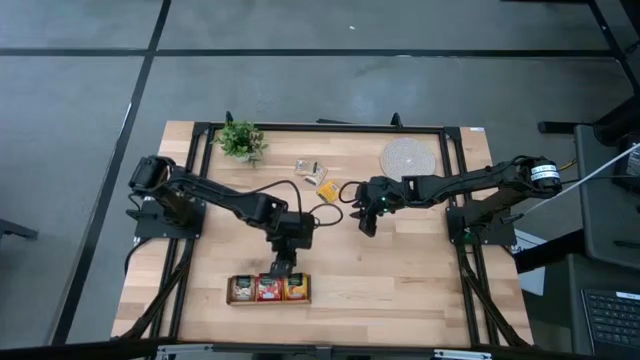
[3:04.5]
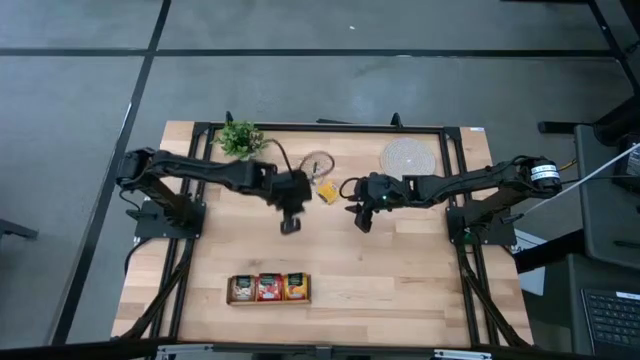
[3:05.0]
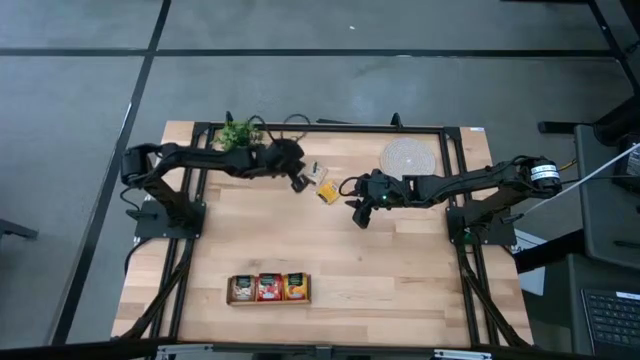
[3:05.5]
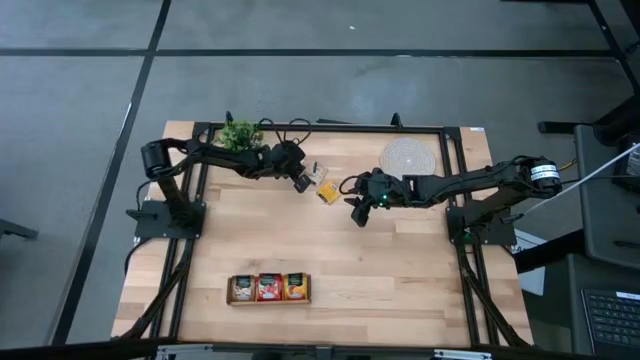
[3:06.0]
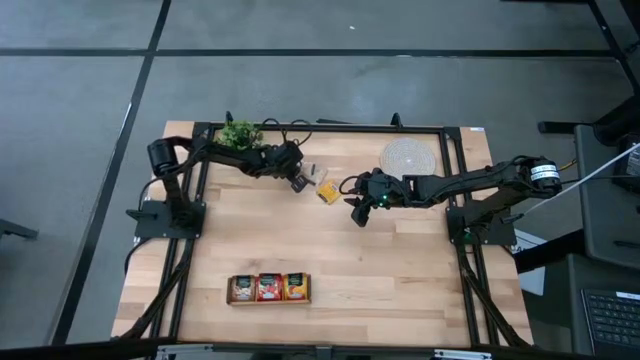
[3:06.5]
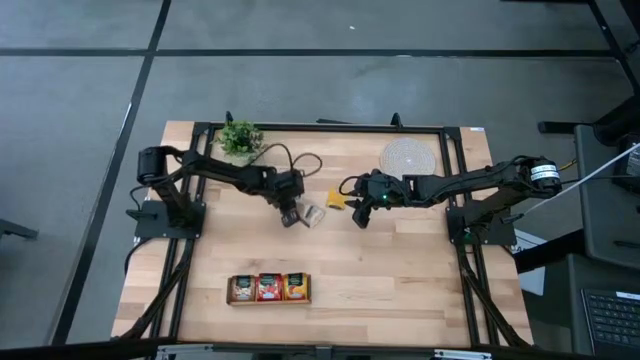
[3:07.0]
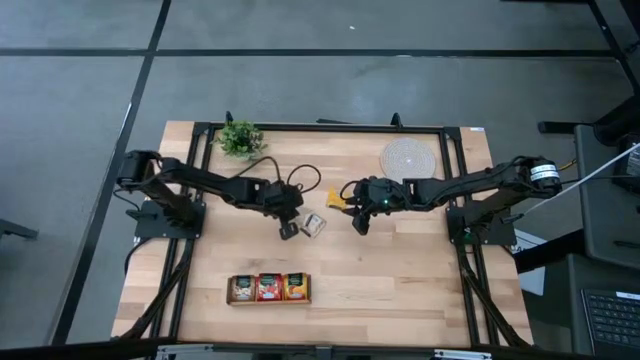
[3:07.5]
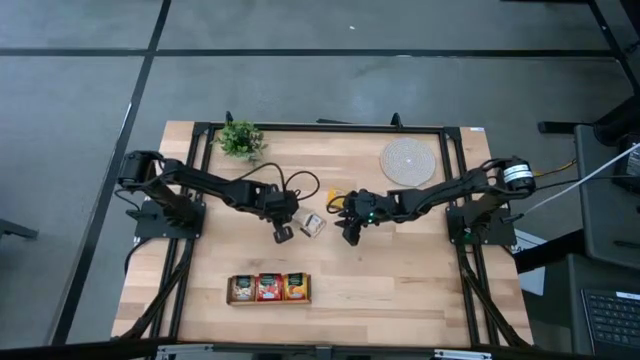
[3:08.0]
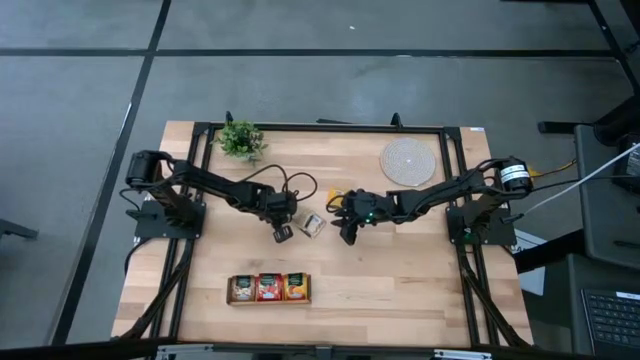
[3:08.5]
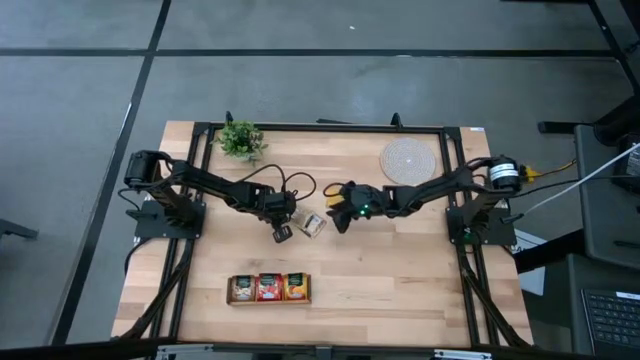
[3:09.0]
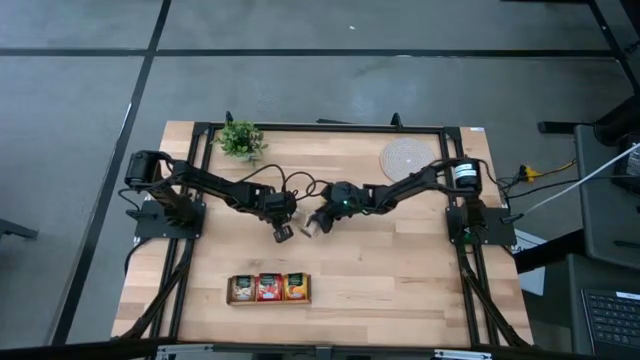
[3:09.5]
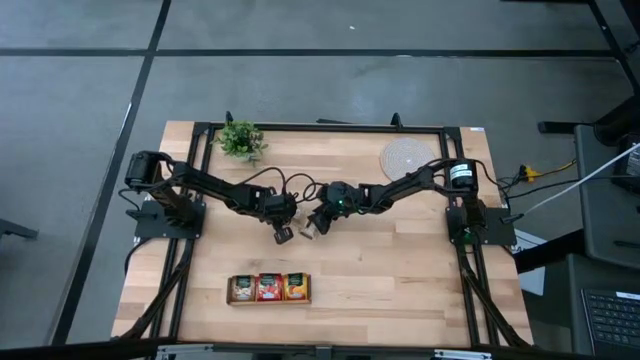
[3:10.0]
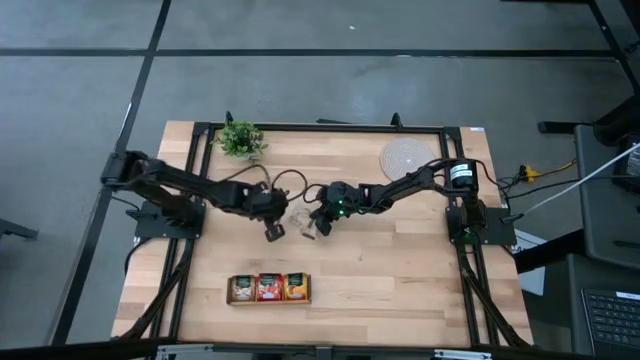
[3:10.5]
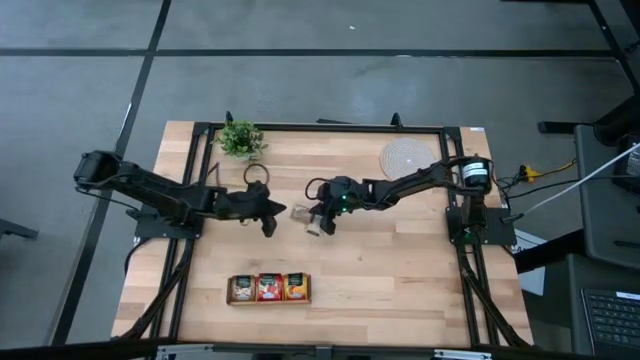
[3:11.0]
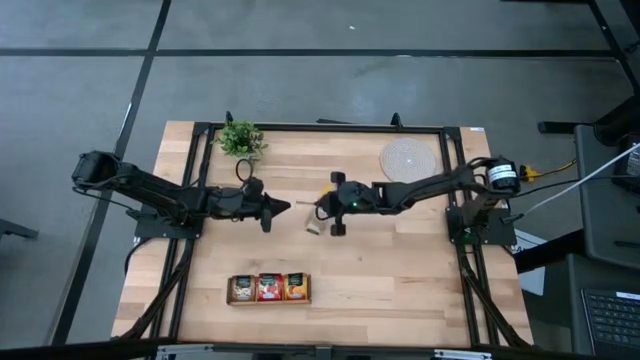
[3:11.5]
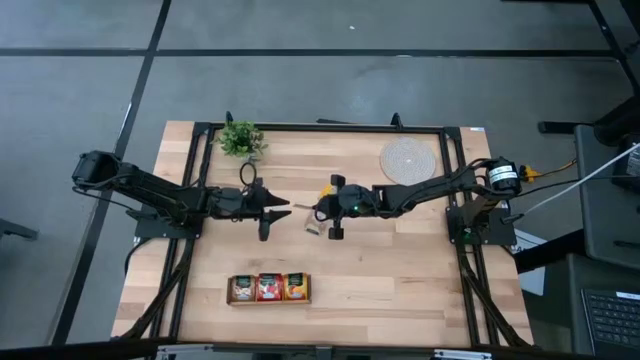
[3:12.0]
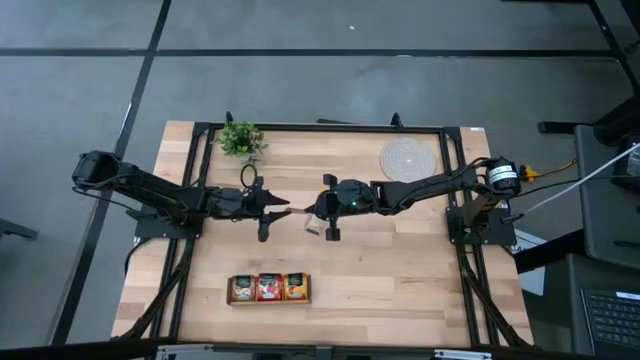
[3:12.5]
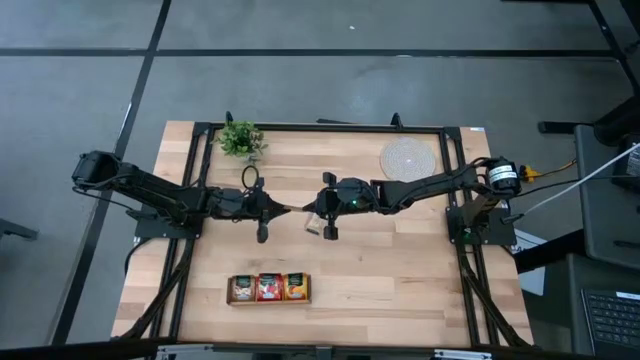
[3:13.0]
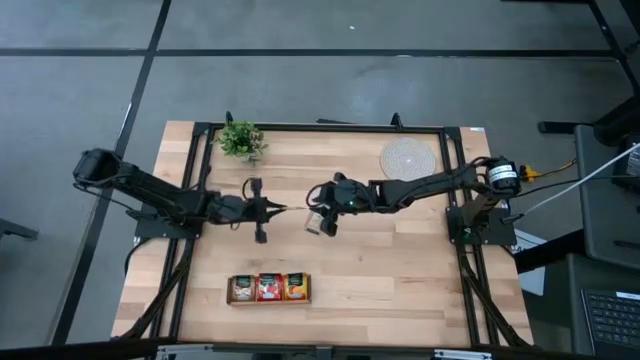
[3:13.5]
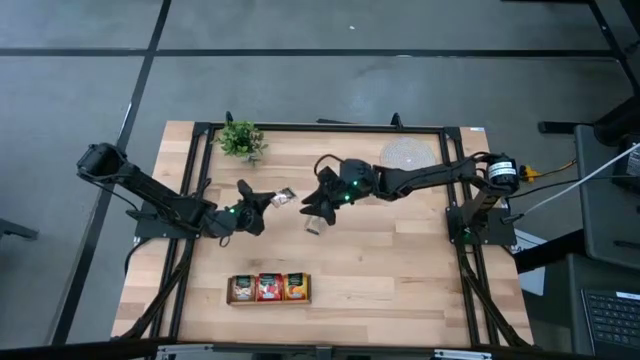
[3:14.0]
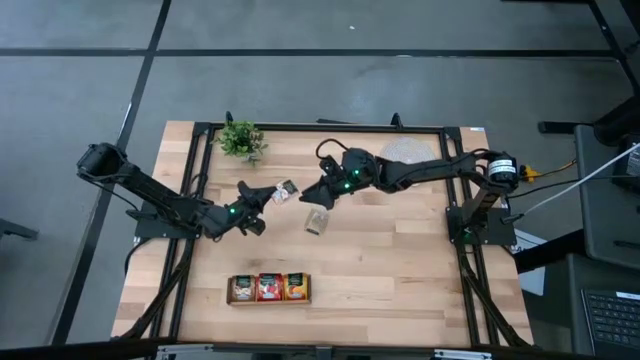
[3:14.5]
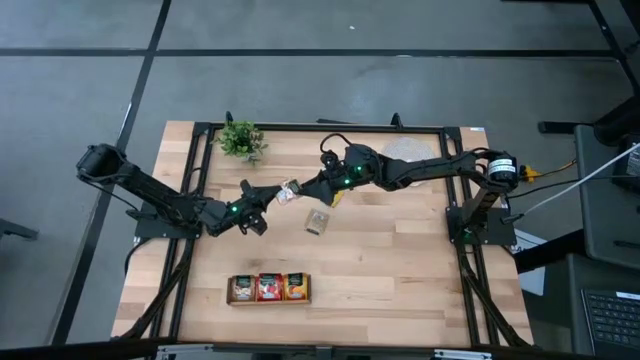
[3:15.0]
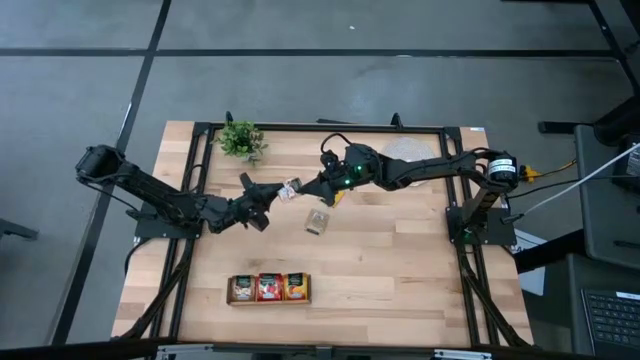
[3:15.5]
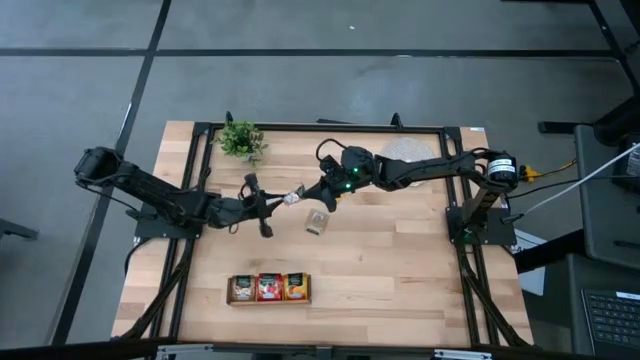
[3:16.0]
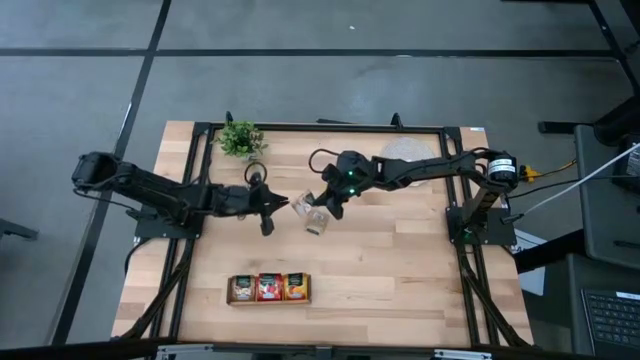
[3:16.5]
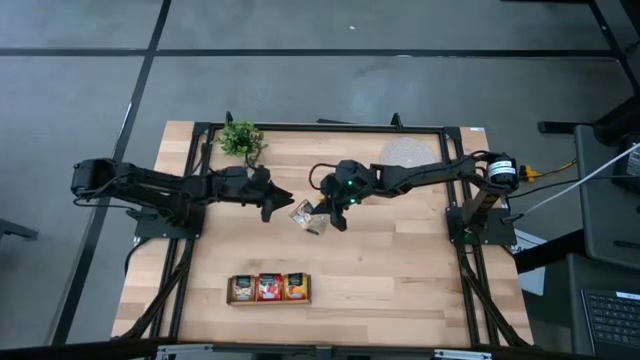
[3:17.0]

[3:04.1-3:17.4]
Task: Pick & Place Tea
Put the brown tea bag into the left section of the wooden organizer

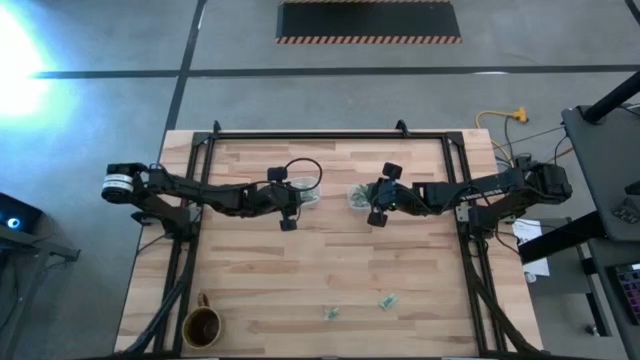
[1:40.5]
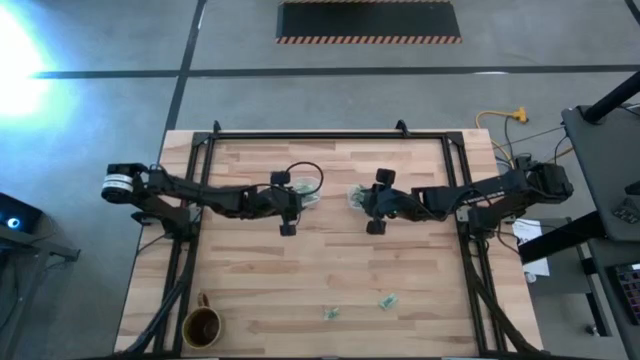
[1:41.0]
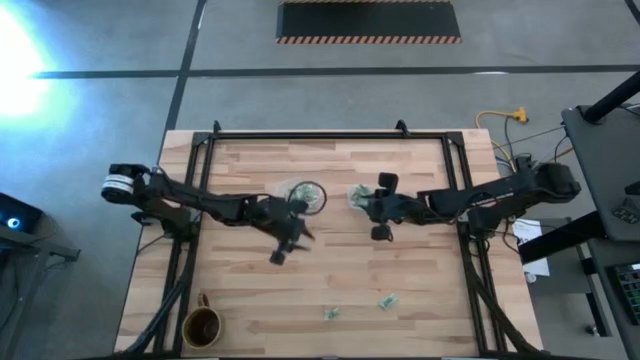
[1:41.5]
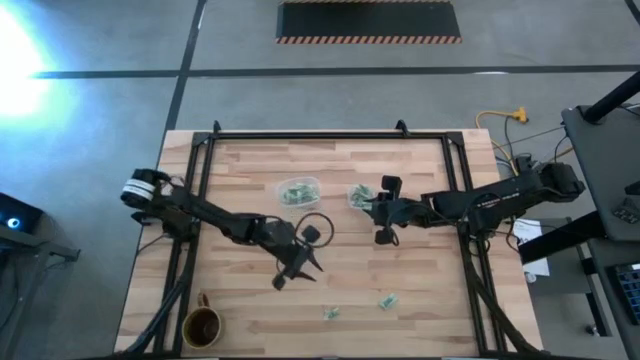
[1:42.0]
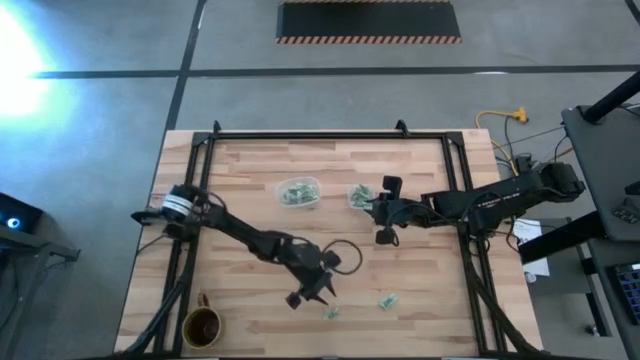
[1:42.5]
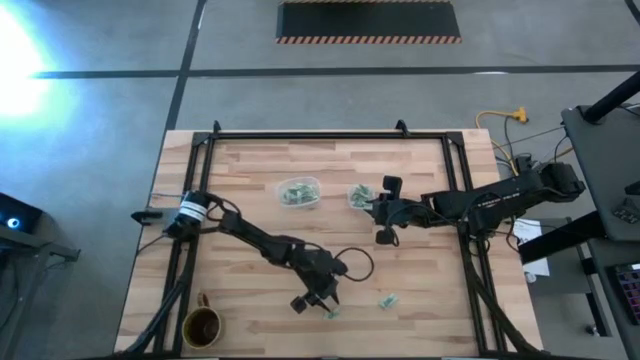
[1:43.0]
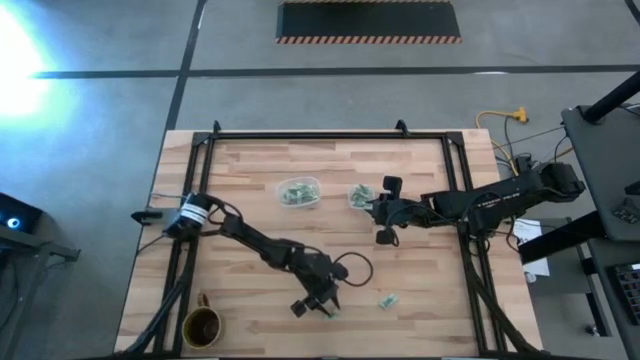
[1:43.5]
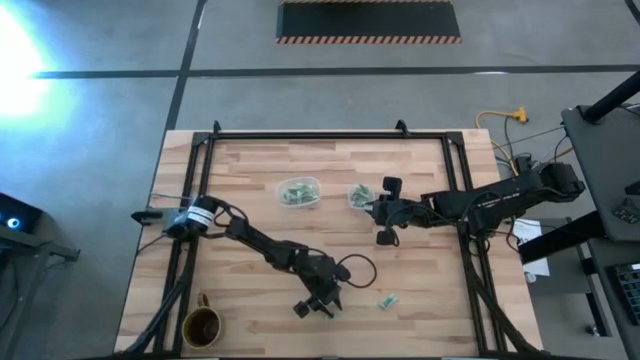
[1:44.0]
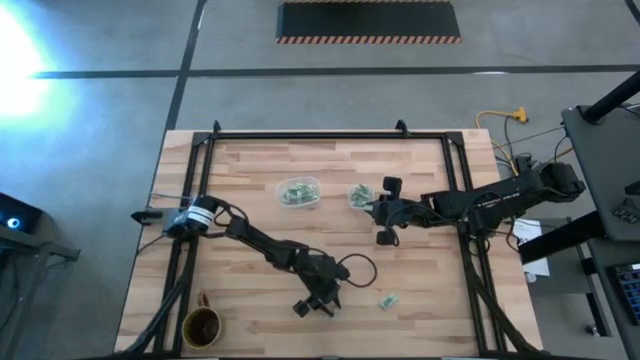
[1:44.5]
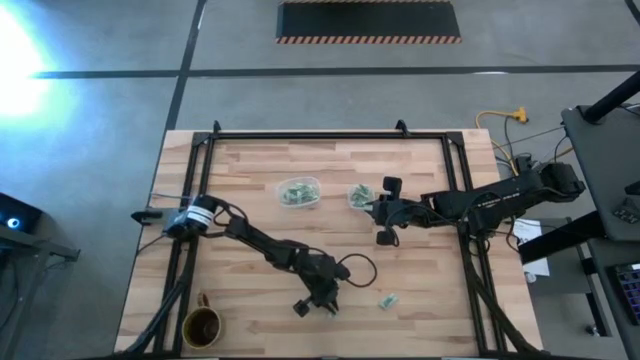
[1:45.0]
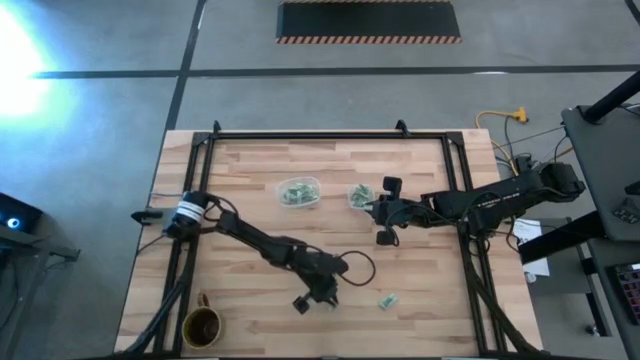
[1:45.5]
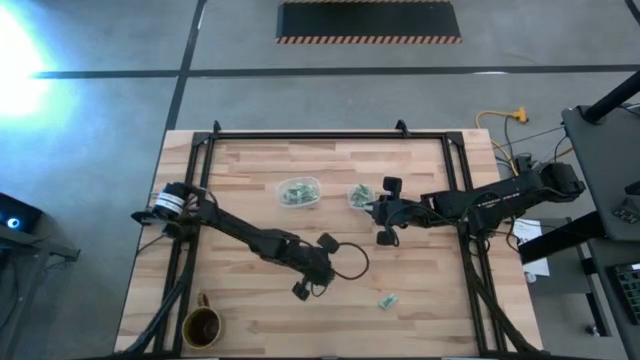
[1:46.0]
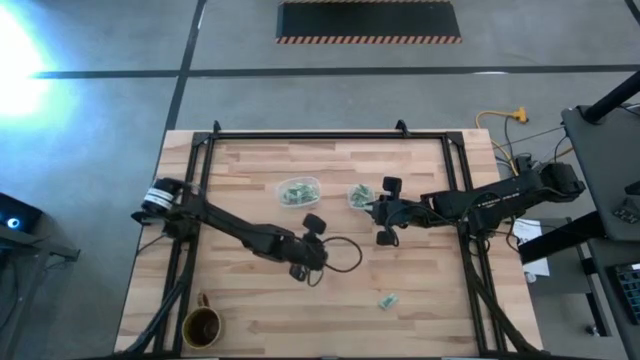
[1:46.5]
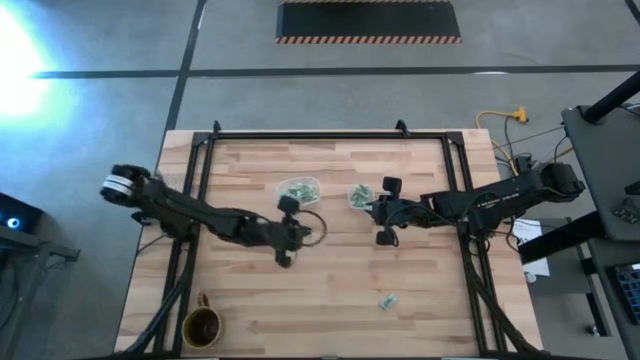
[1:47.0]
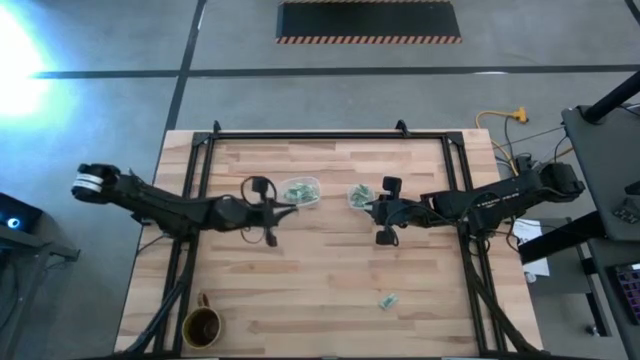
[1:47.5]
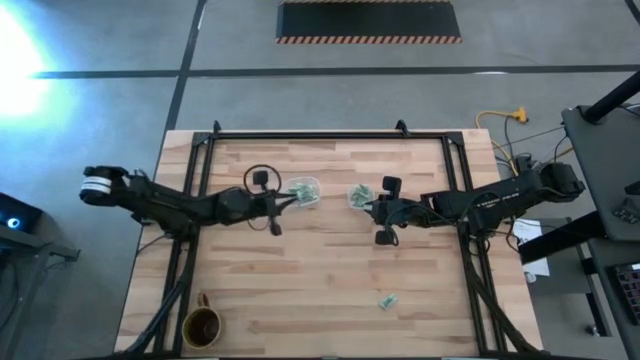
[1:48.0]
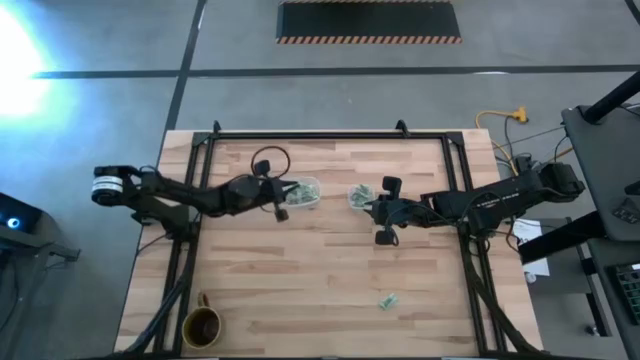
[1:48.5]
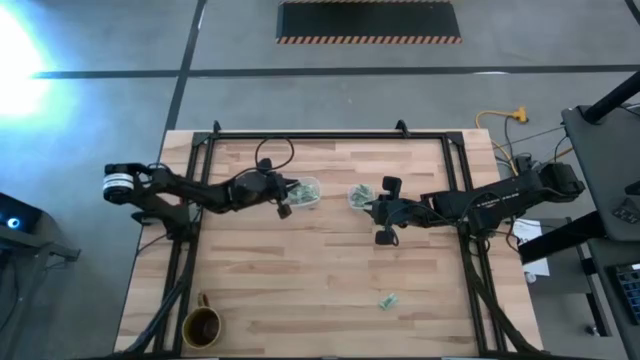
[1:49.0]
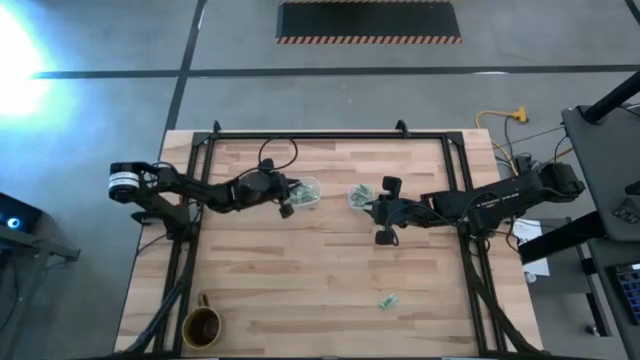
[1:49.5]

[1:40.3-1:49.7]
Task: Pick and place Stevia / Truvia into bins
Put the left stevia packet into the transparent oval container
